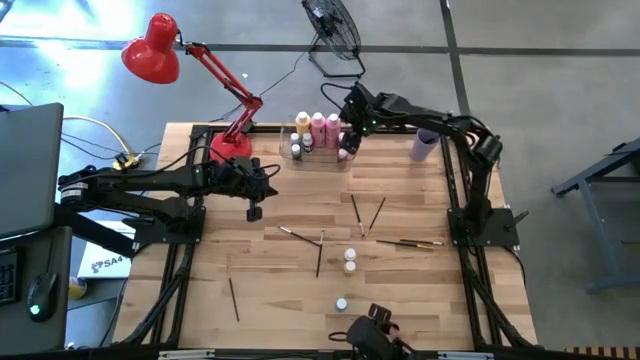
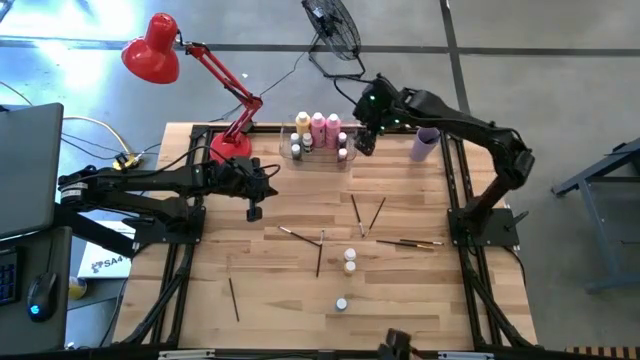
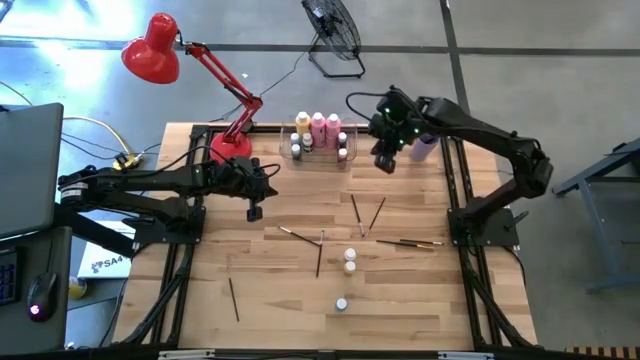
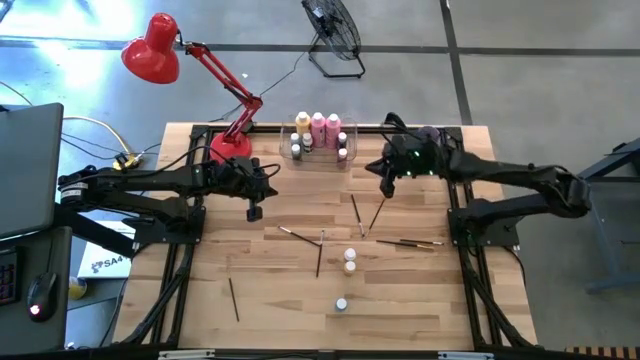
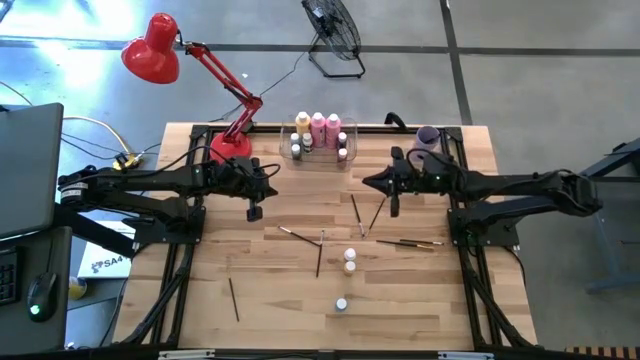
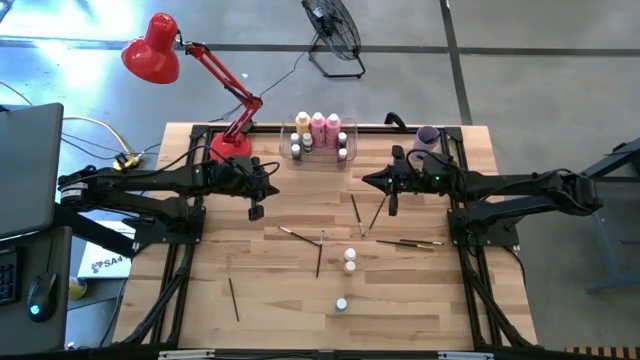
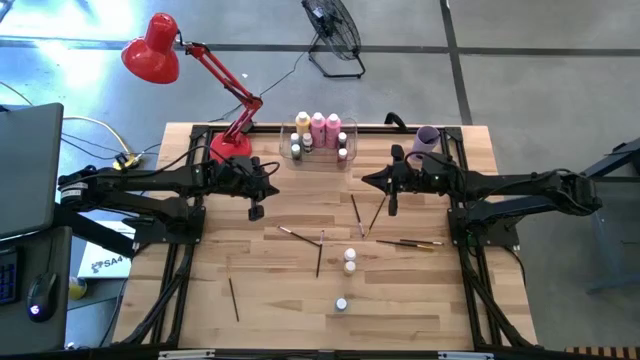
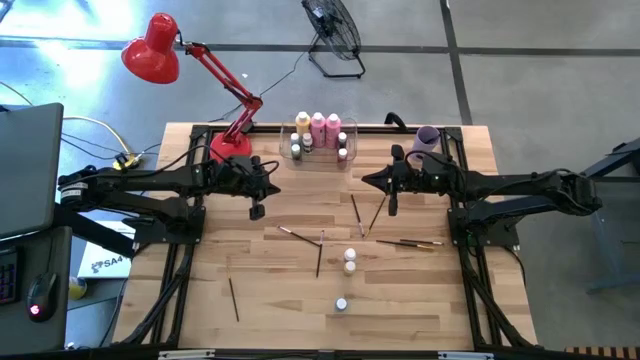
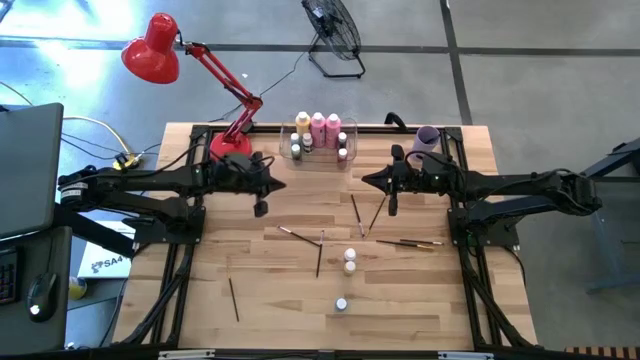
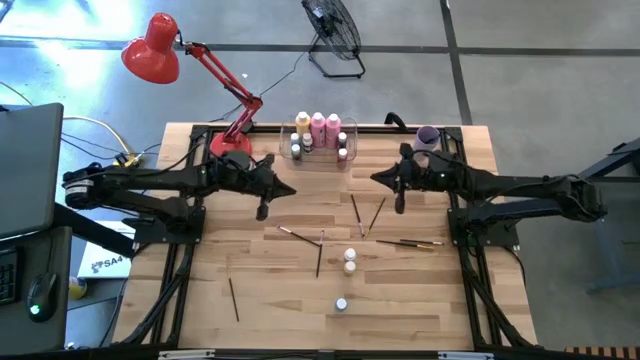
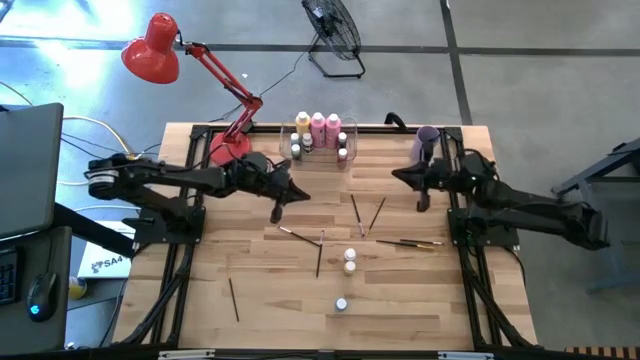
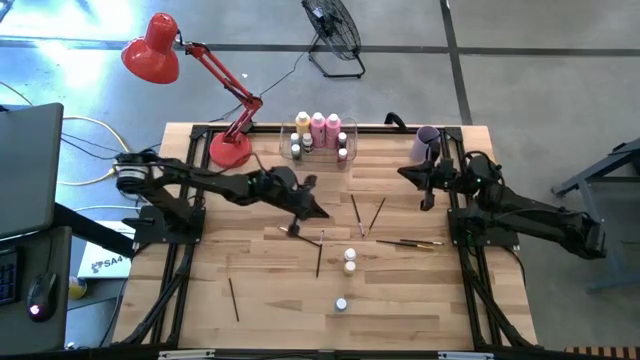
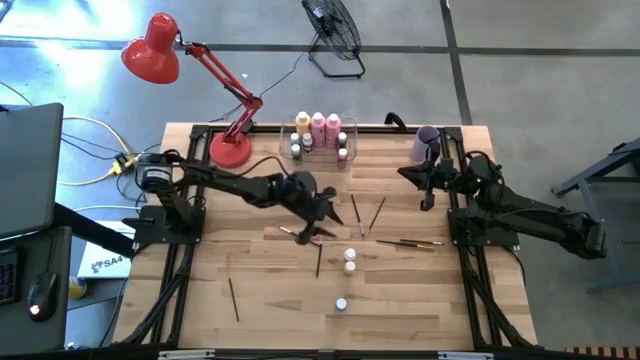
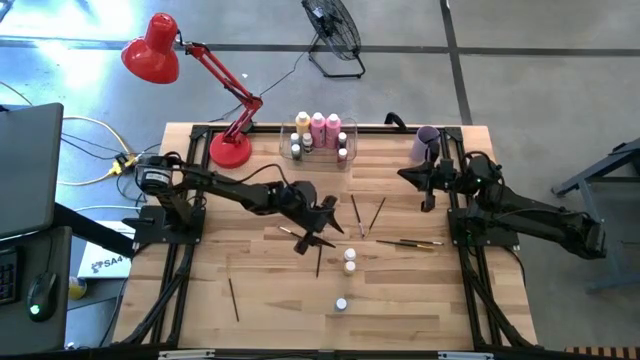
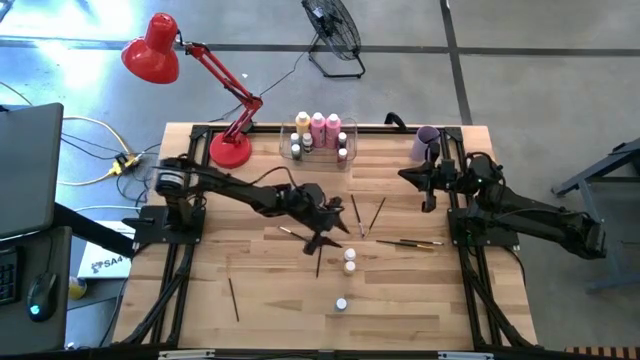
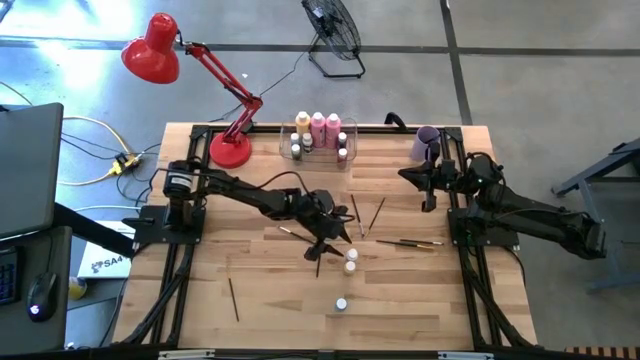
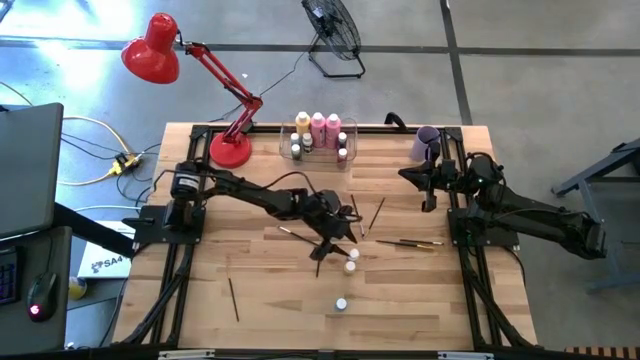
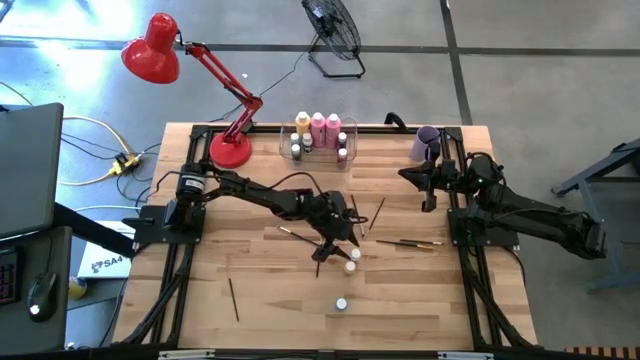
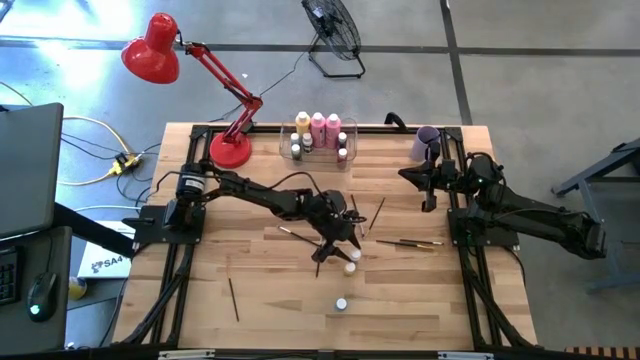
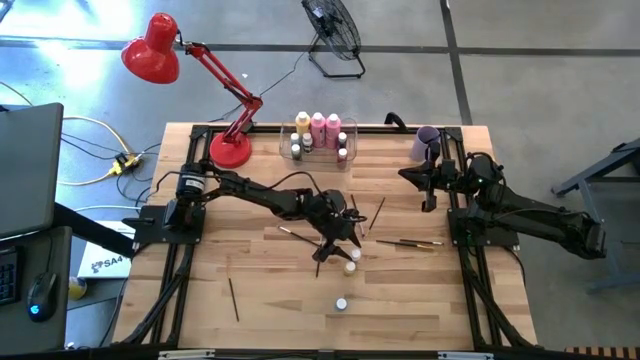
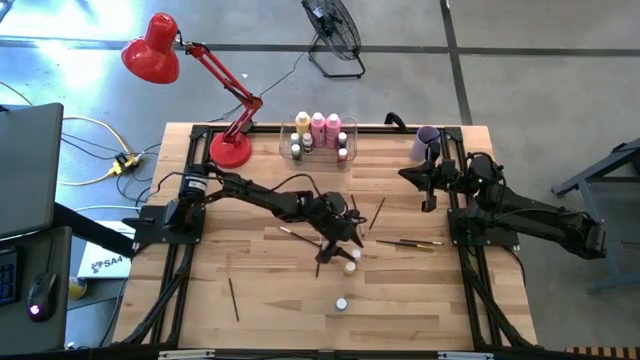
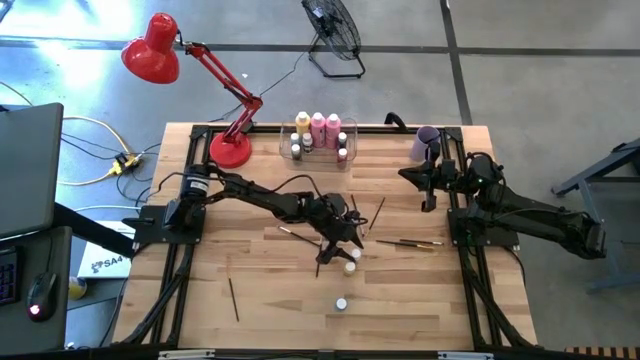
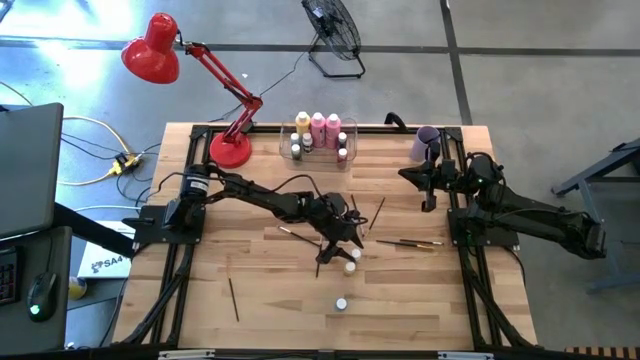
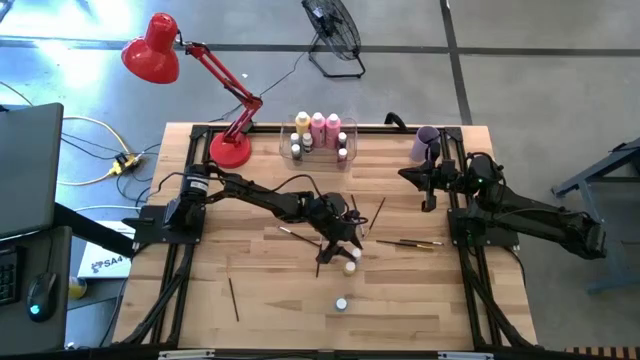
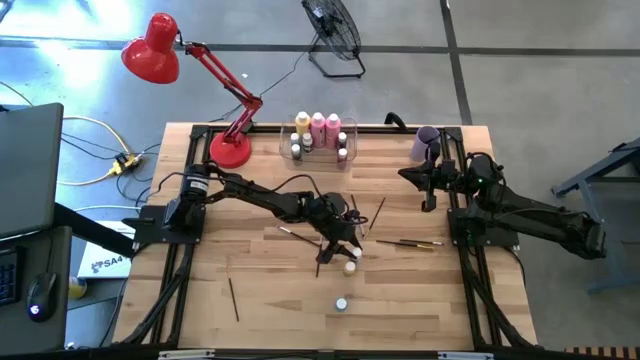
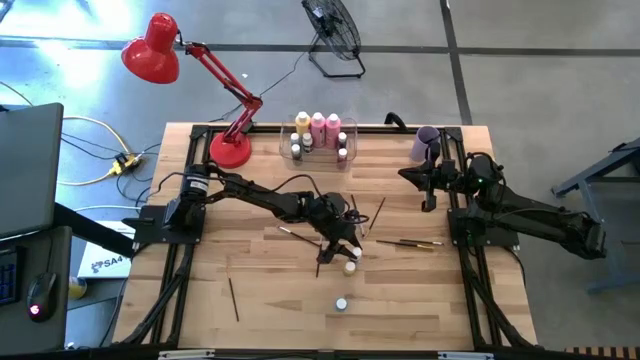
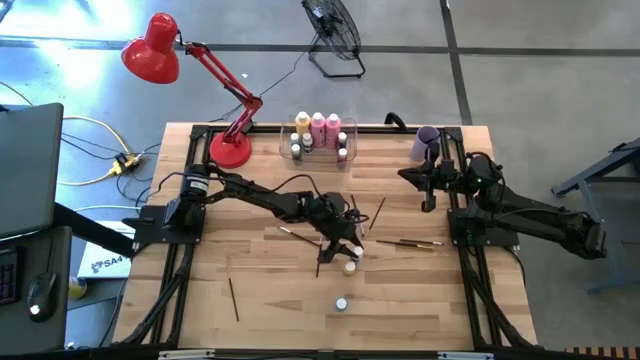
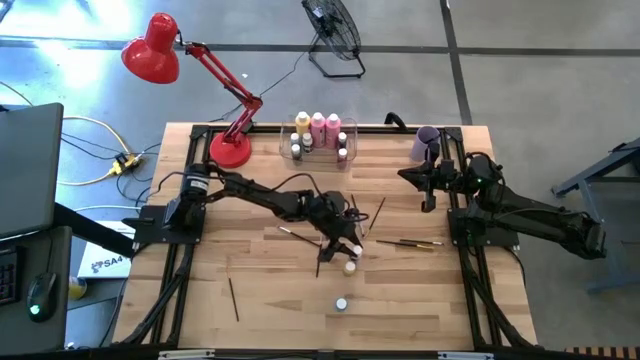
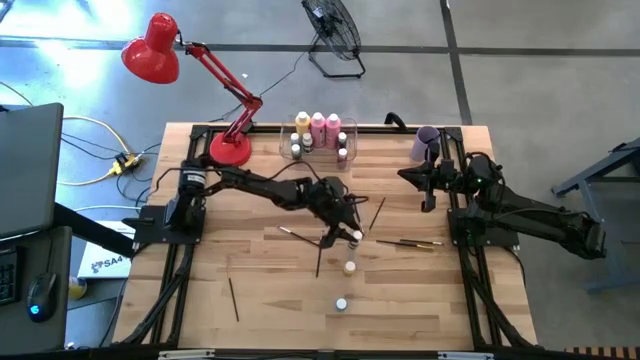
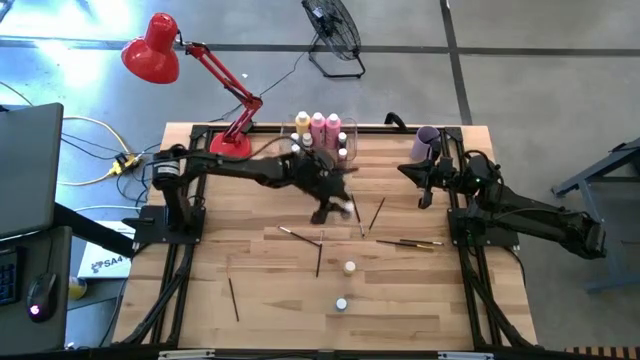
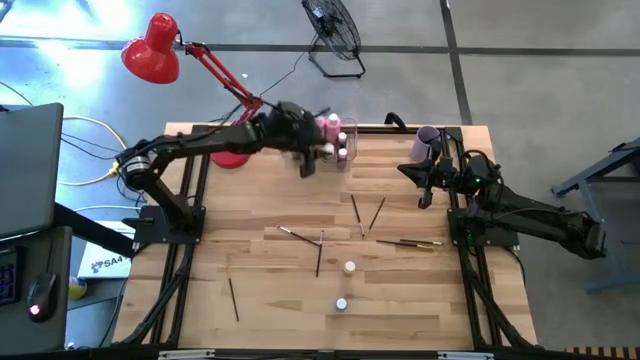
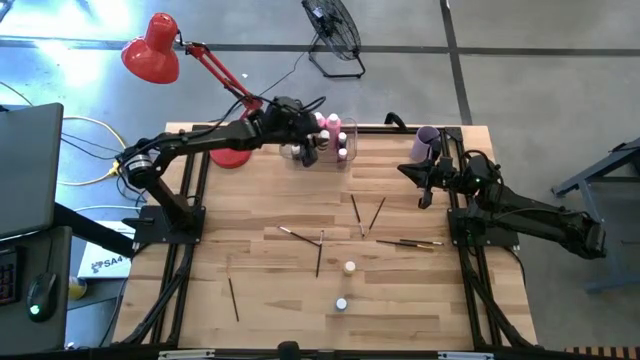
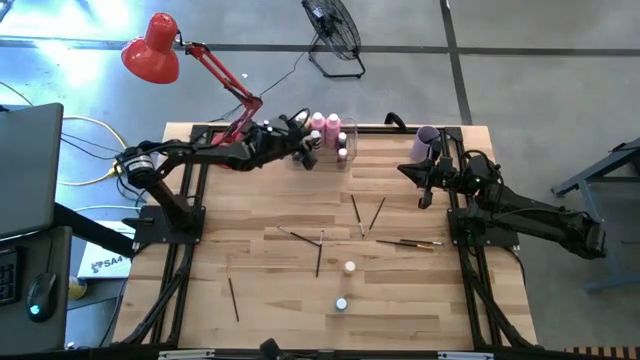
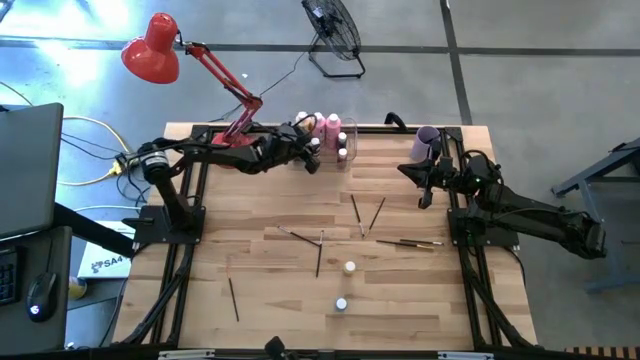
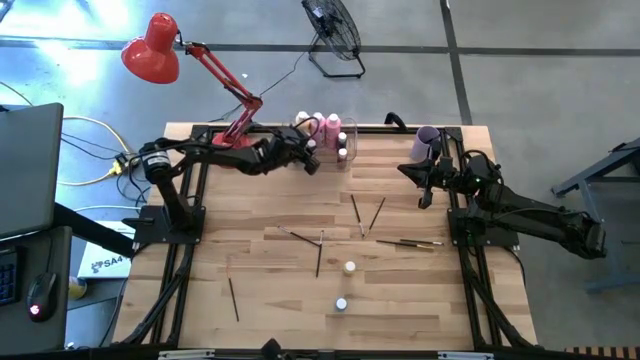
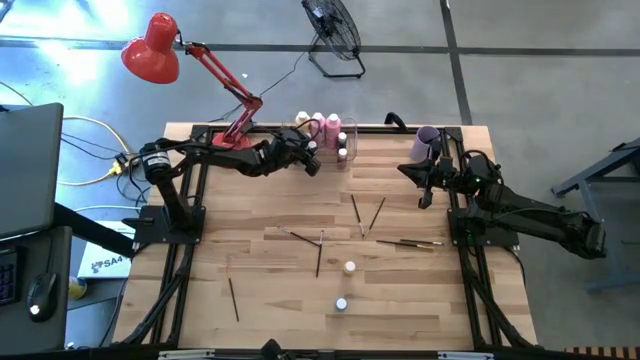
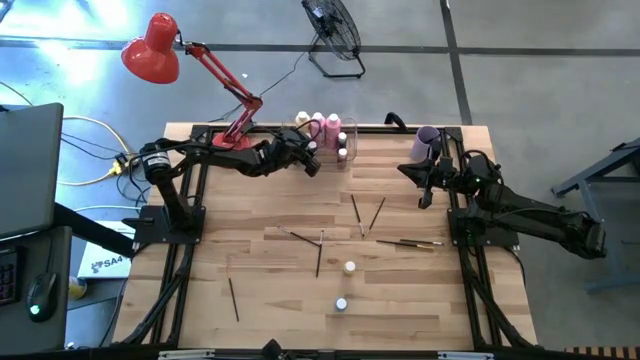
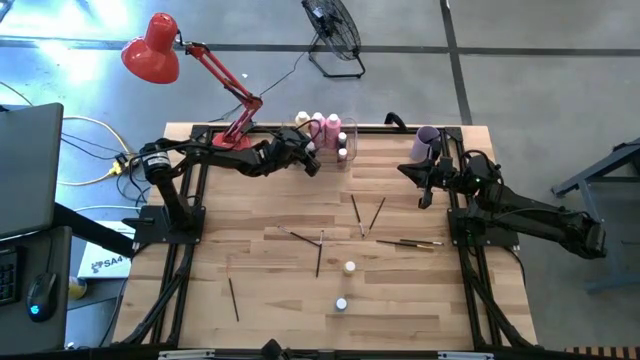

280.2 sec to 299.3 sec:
Task: Pick & Place Paint Supplies
Put the small white paint bottle into the transparent bin

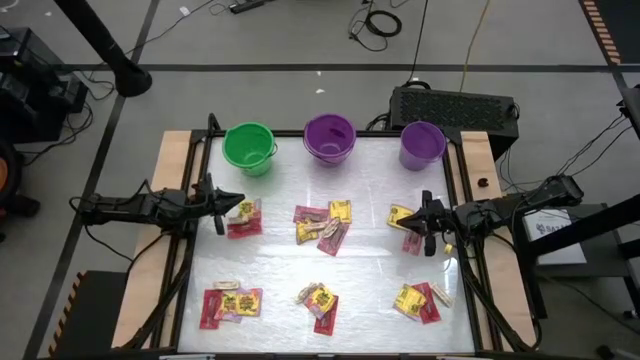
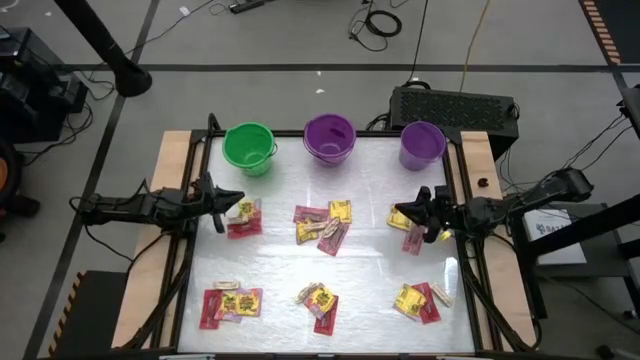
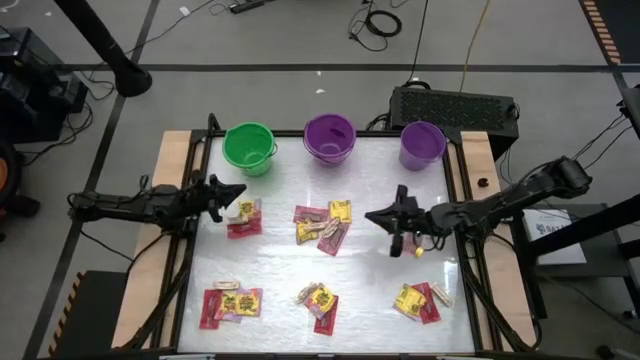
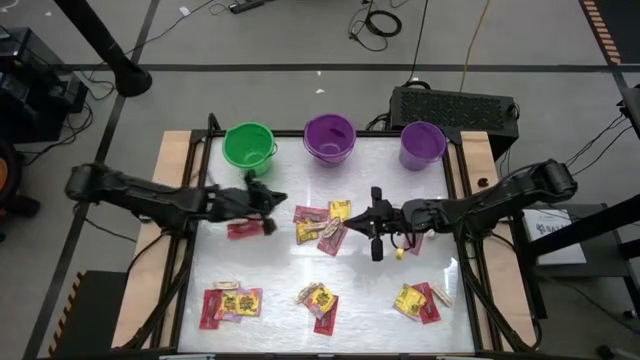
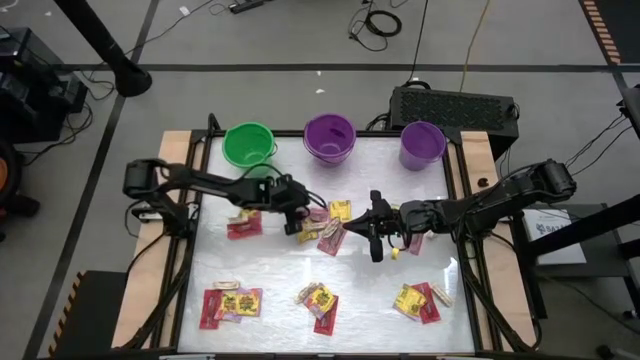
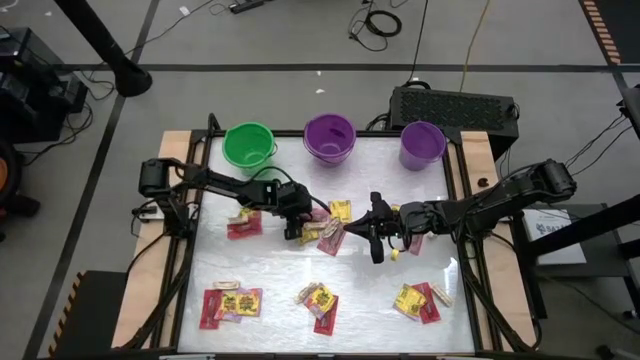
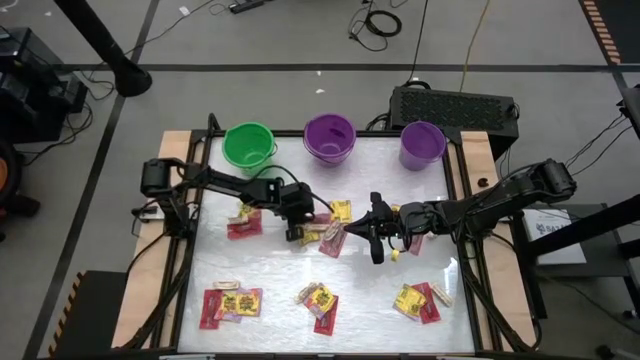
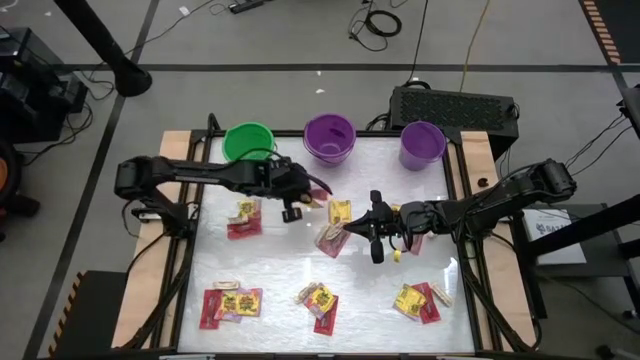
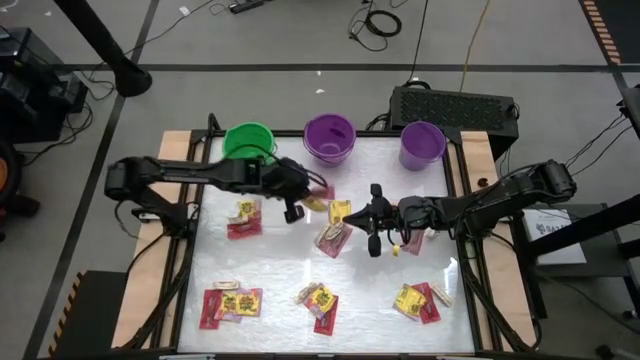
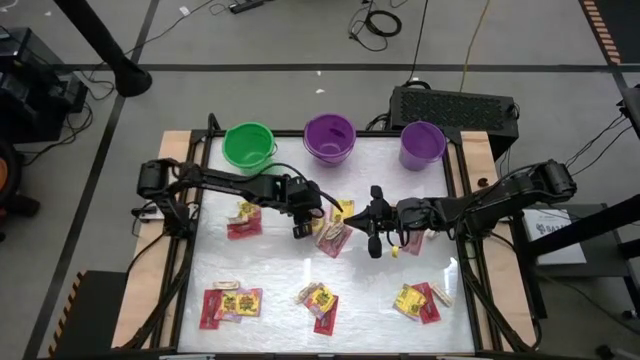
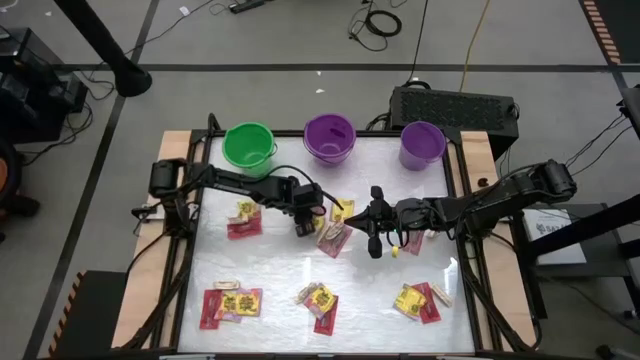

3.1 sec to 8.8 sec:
Task: Sort candy by brand, put in halloween buckets
Put the red candy pack in the green bucket
